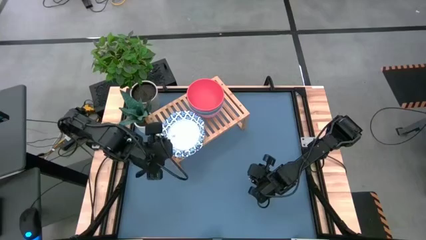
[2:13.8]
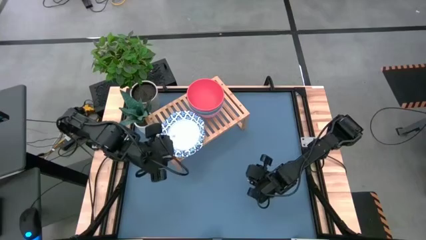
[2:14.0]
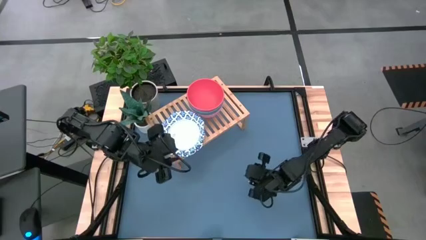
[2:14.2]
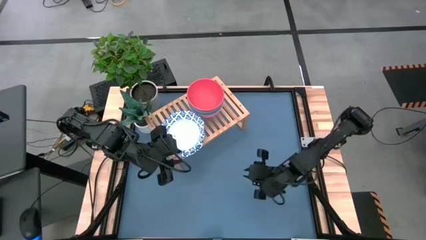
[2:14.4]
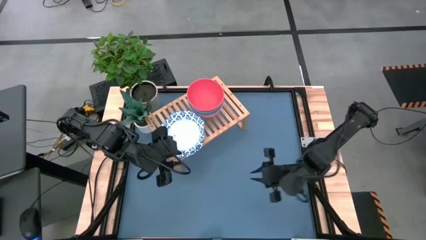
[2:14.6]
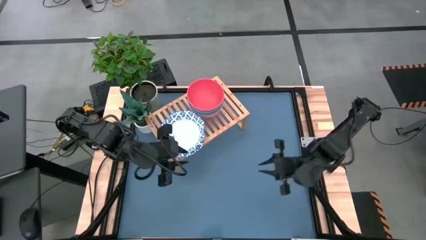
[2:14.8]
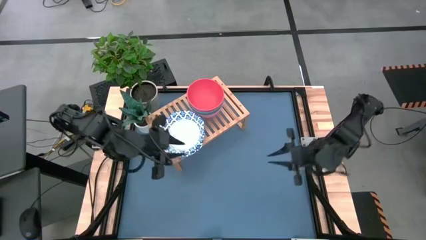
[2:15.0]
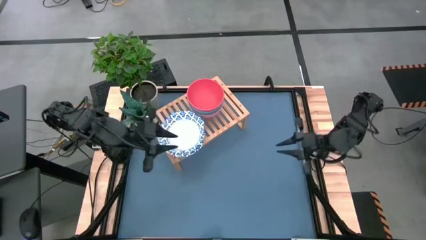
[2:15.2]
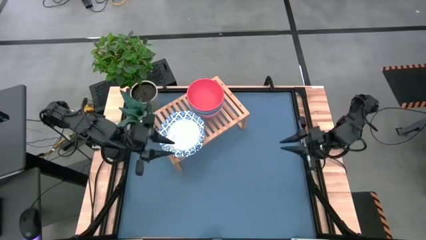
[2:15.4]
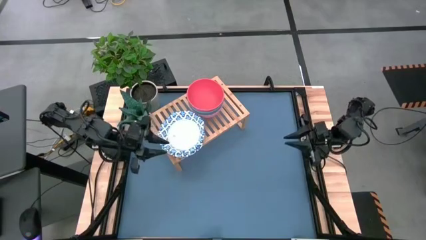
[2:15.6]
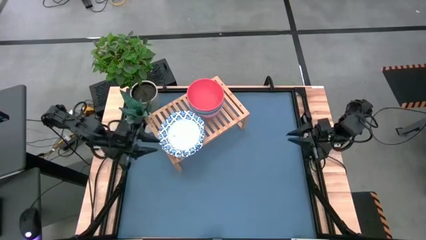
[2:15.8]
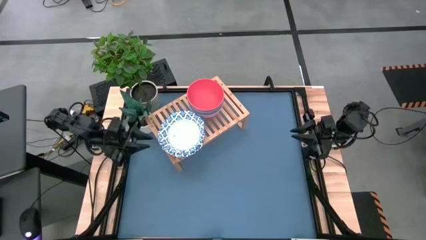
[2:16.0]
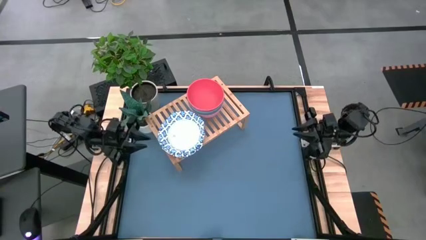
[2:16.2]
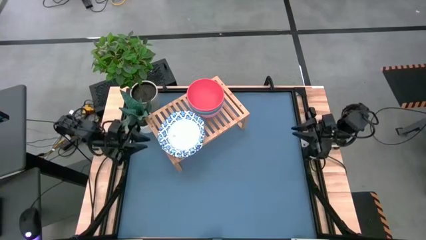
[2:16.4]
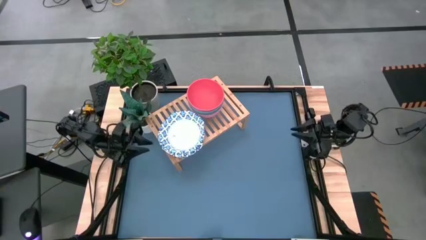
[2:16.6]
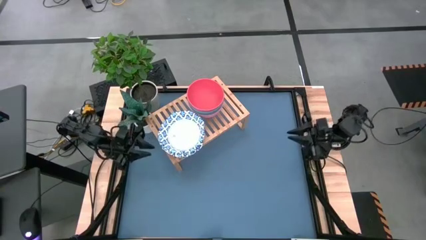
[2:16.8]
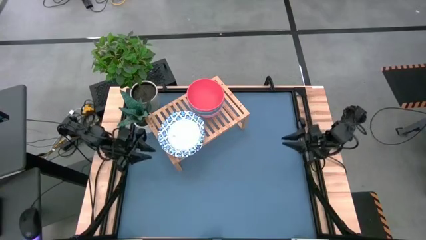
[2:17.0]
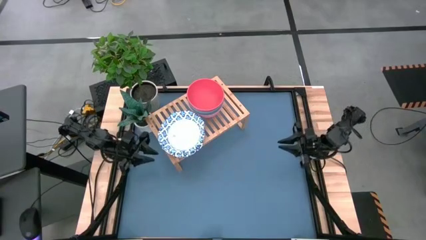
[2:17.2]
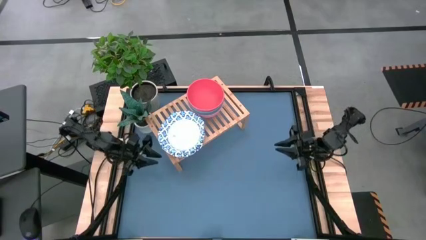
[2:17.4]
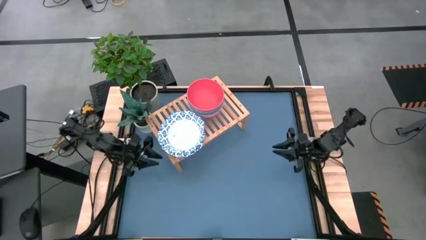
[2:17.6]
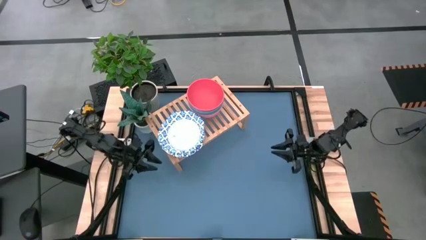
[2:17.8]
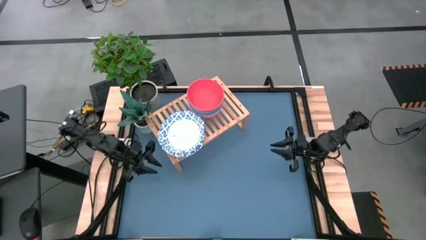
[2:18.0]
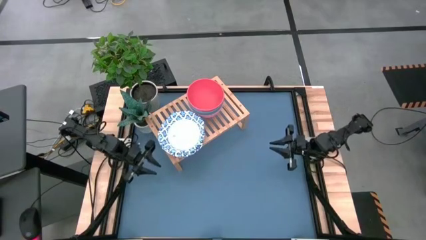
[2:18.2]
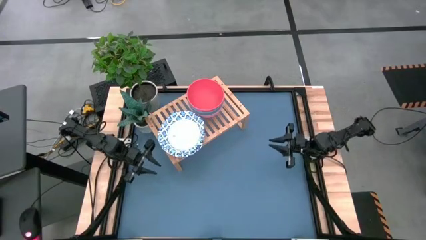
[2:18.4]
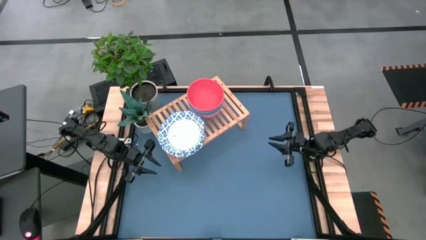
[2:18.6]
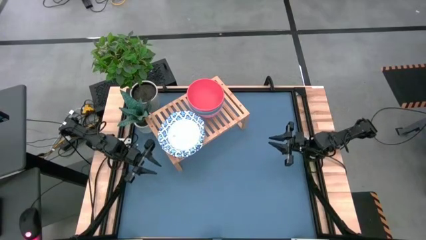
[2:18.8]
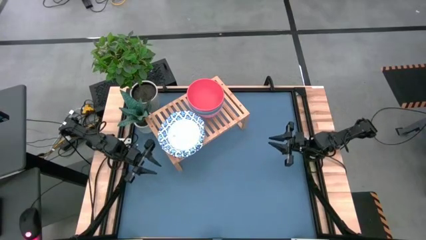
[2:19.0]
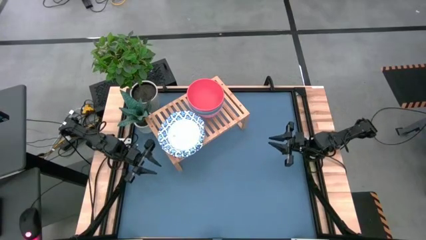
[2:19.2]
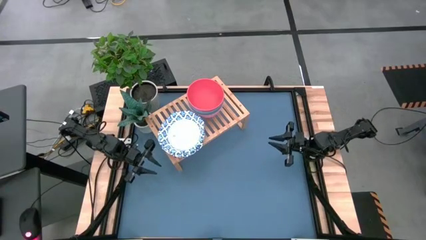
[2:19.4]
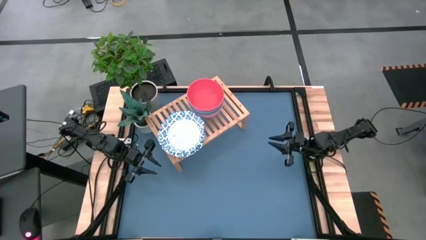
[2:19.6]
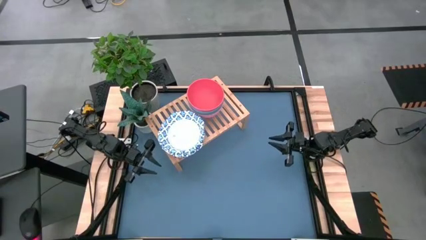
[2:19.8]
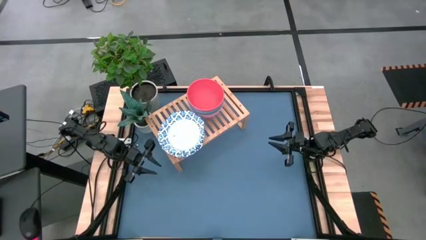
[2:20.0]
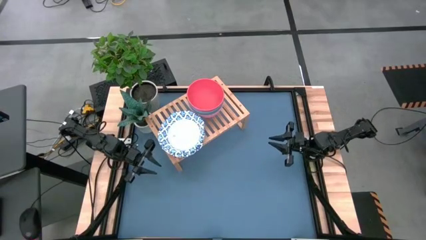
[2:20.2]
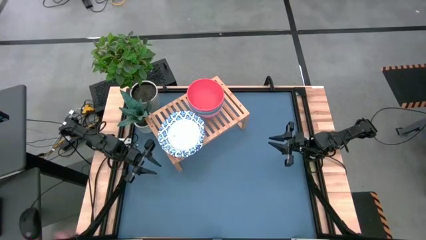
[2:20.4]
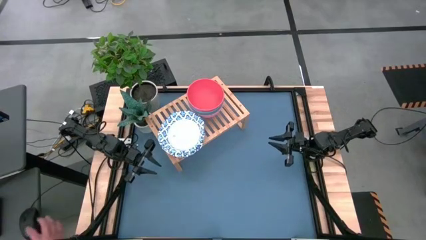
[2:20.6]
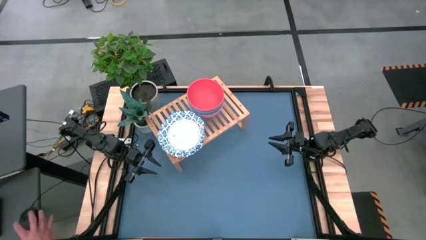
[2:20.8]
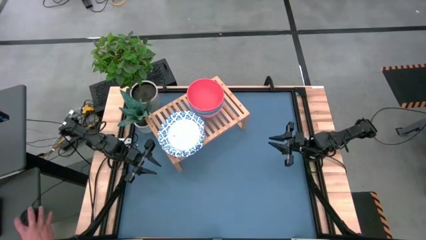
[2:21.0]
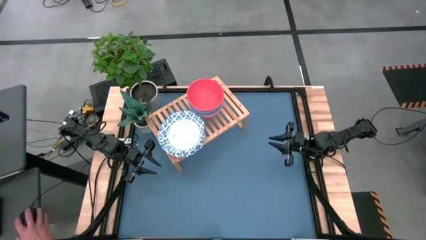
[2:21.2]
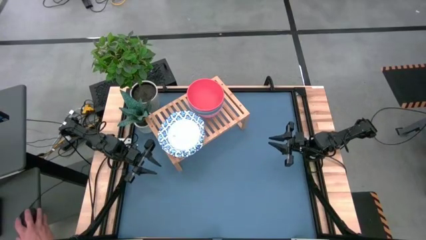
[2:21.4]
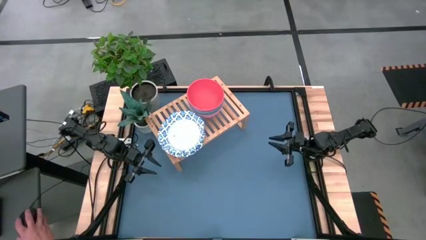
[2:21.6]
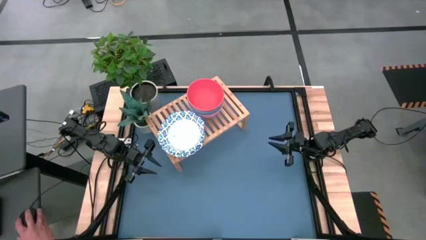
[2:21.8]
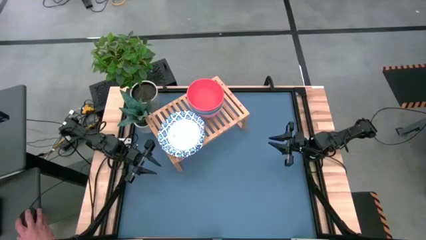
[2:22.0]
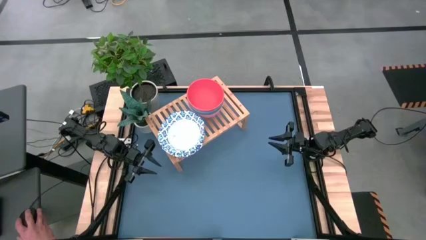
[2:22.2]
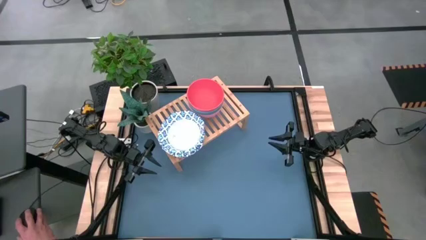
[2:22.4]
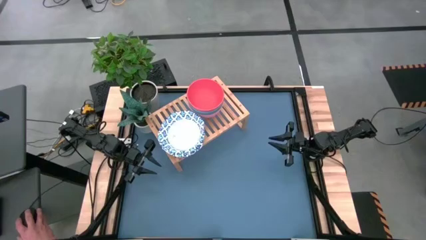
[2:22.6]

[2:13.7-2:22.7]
Task: Place and stack bowls onto a shelf
Return to Home Position

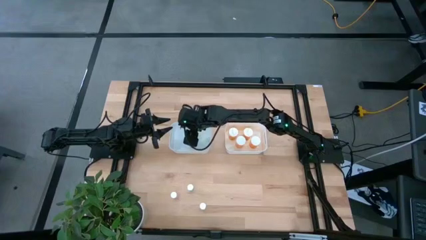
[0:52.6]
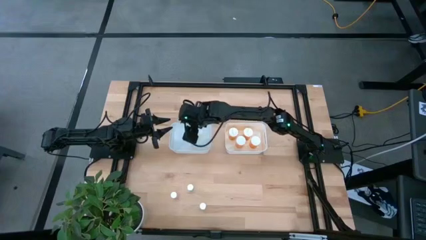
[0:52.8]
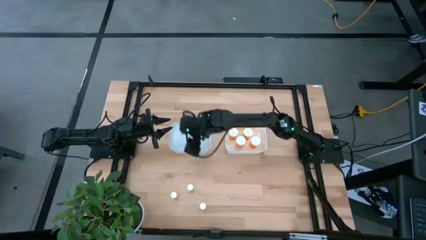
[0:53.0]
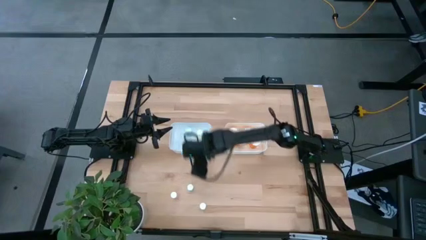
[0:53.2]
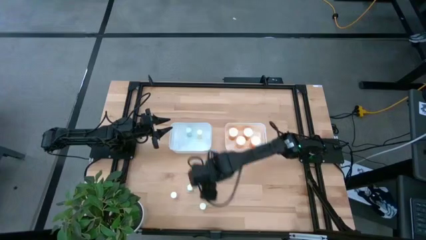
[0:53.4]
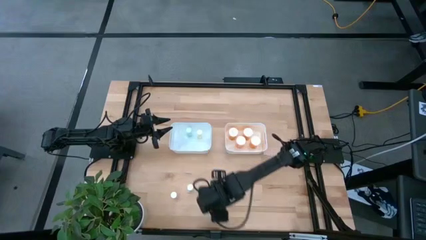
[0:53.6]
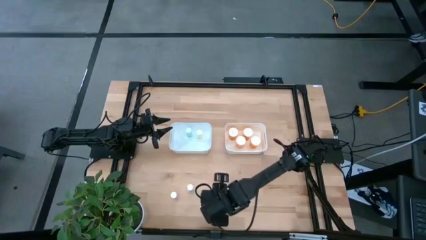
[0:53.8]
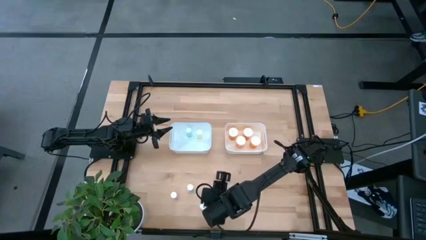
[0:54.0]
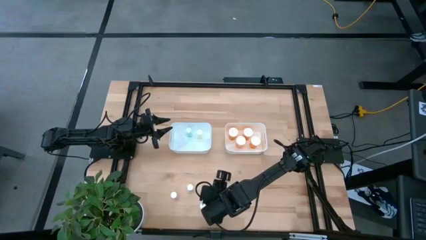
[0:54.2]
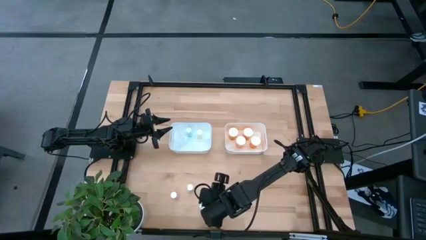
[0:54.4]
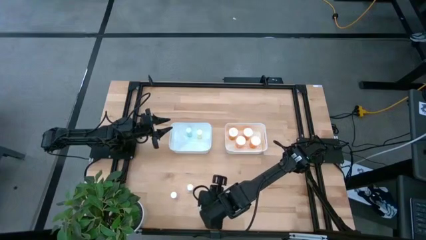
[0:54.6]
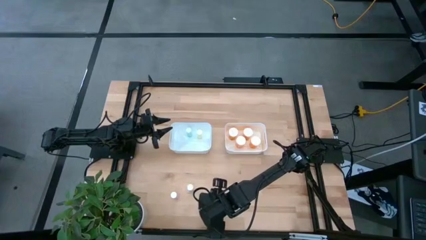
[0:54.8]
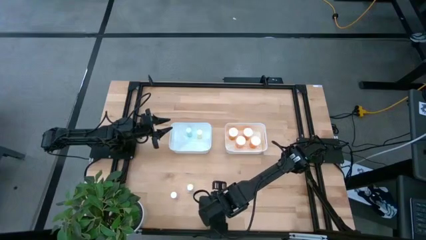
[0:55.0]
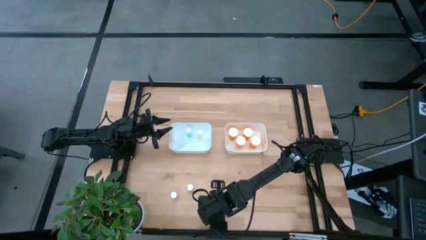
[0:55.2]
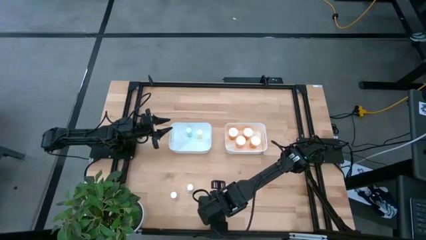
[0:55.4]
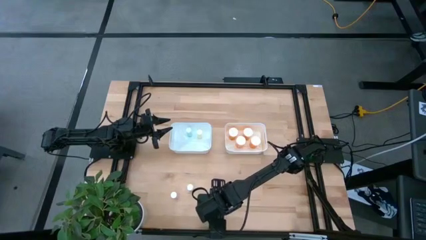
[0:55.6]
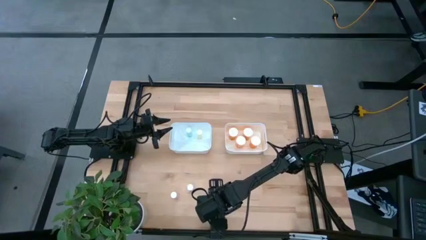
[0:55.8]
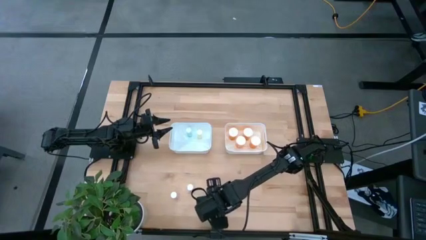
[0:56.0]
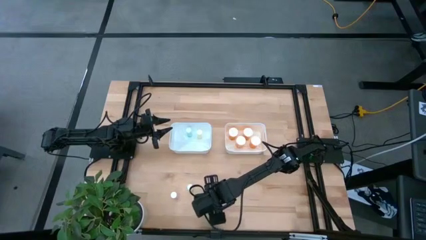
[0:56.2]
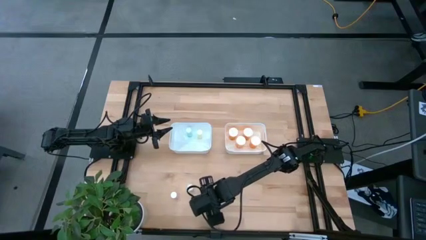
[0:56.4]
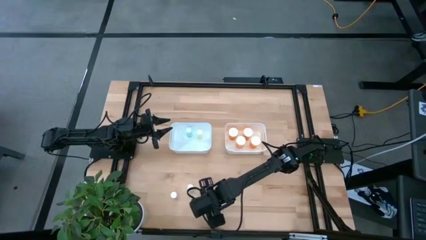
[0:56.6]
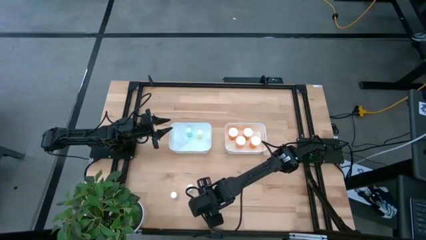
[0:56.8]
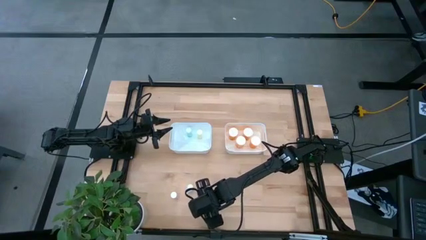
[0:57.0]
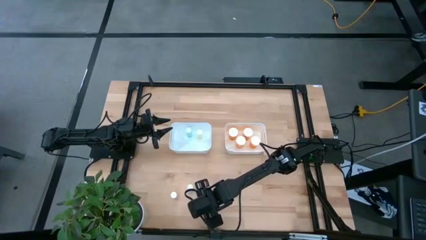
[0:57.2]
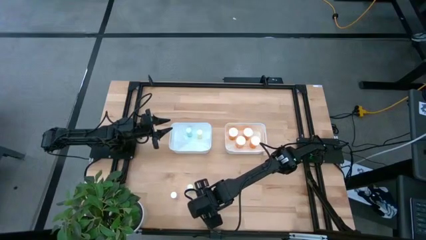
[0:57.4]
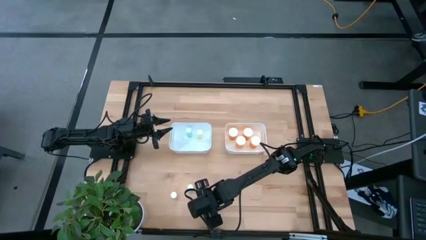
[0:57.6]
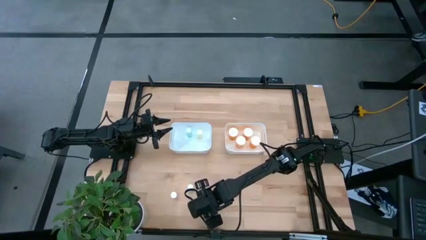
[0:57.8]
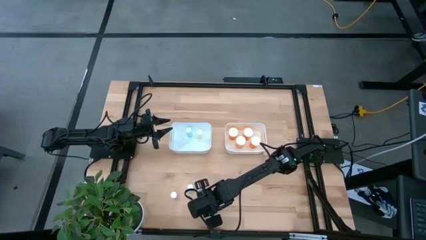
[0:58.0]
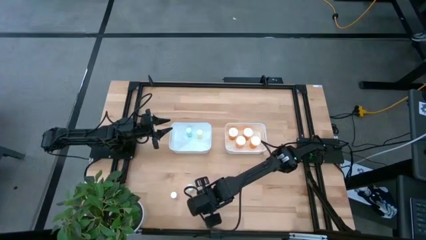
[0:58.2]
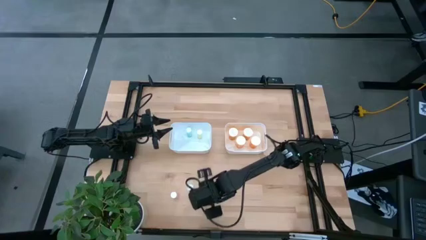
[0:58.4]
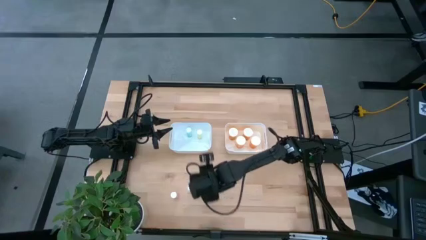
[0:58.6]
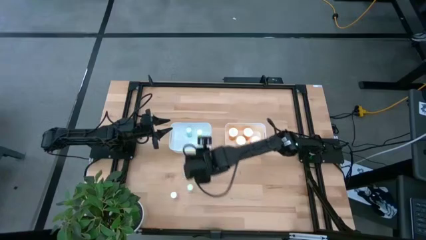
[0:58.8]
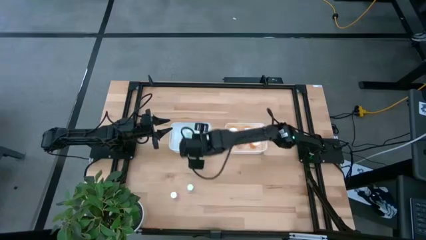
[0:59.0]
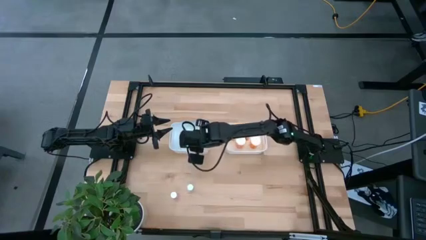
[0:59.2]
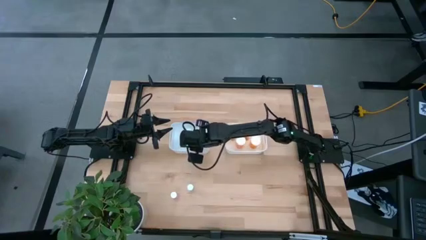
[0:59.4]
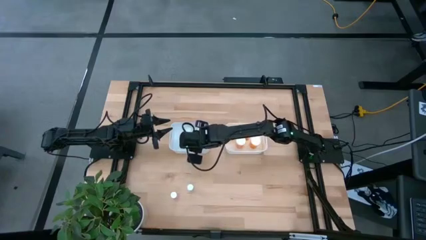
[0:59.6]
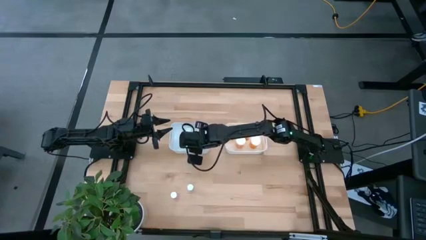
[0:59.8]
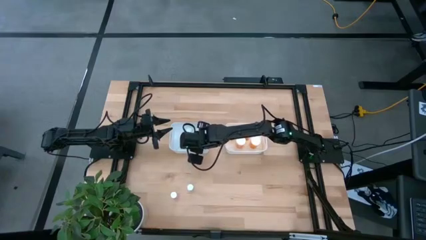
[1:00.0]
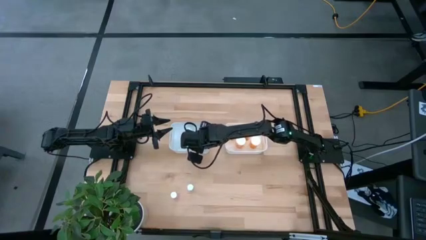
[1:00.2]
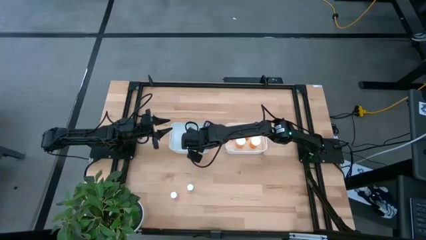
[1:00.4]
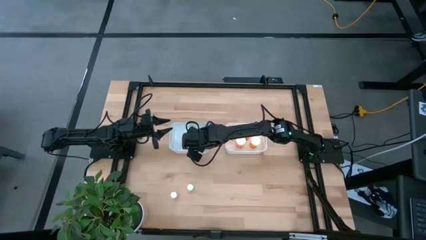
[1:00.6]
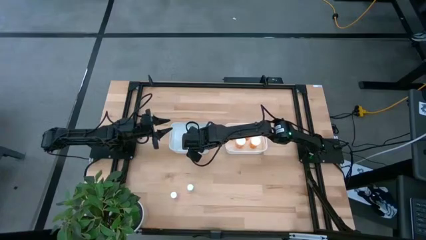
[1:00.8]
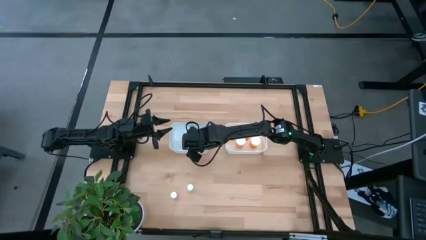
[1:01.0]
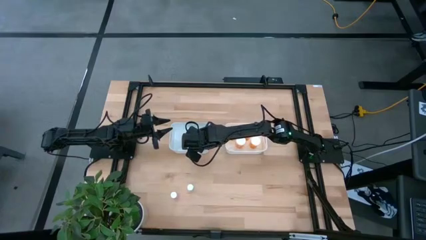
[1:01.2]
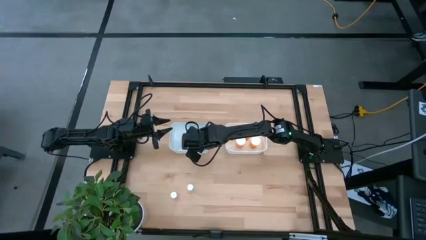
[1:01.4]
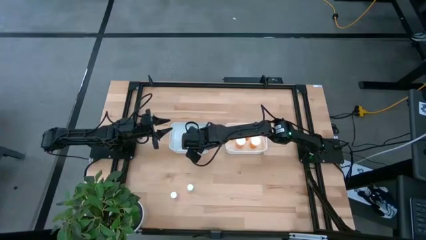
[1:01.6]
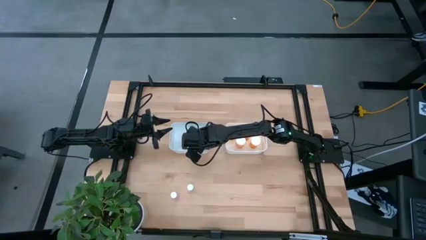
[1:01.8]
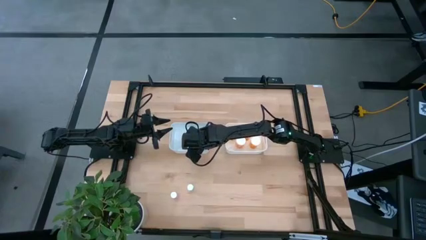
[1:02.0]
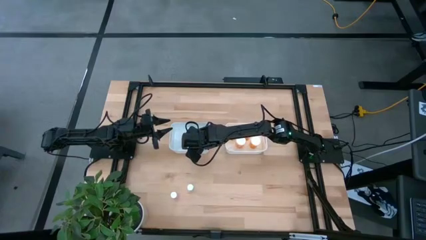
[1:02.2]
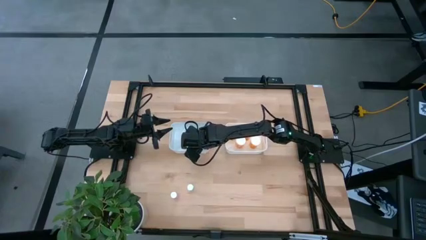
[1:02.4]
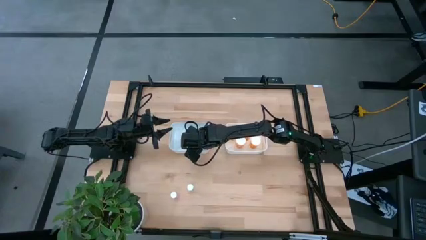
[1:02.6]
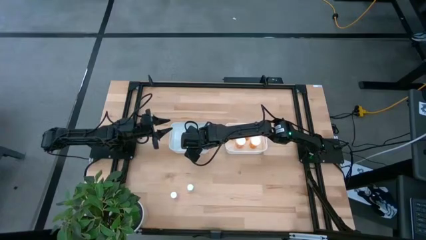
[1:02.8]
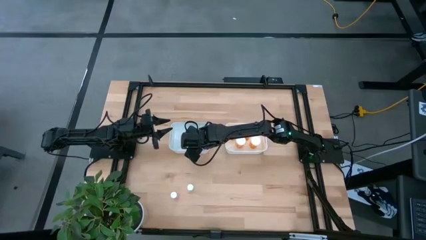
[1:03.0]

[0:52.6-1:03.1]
Task: Pick and place medicine bottles into bin by pill shape (circle, oval)
Put the small yellow pill bottle into the left white bin
